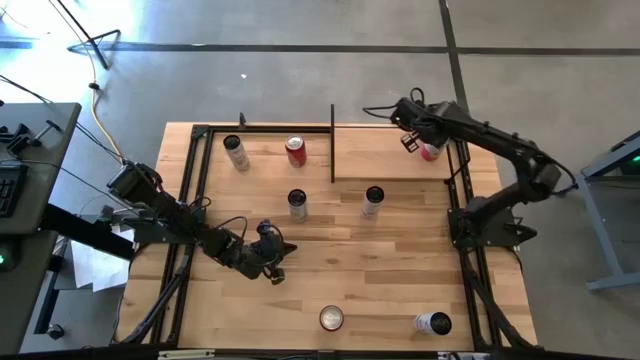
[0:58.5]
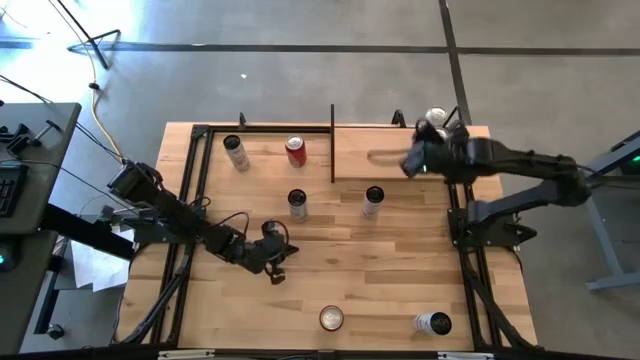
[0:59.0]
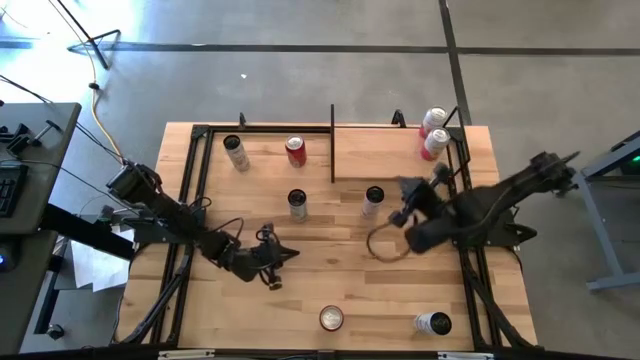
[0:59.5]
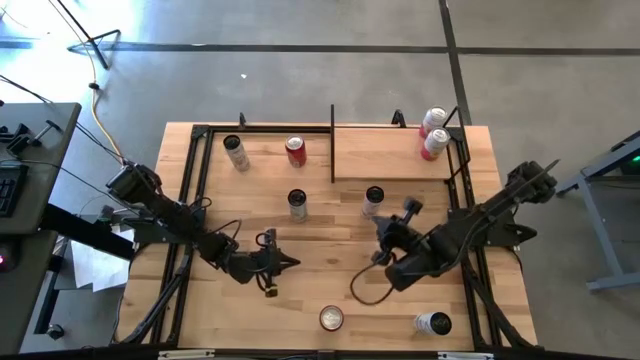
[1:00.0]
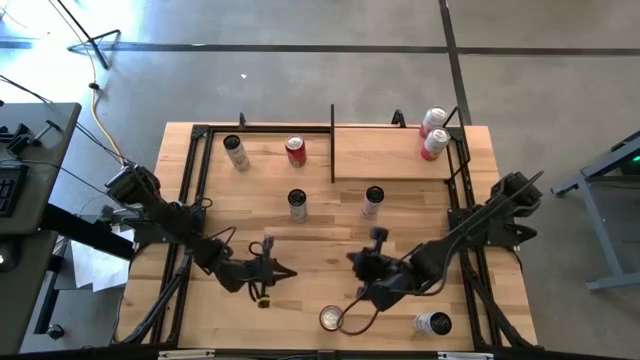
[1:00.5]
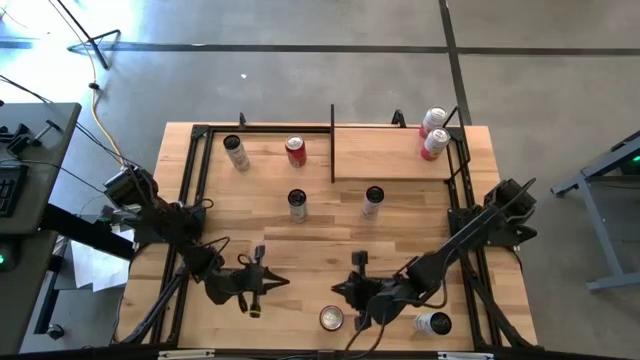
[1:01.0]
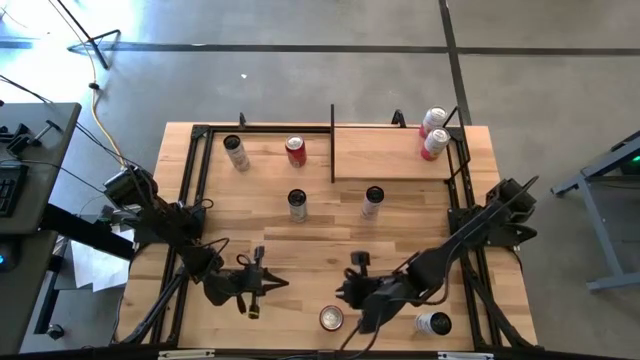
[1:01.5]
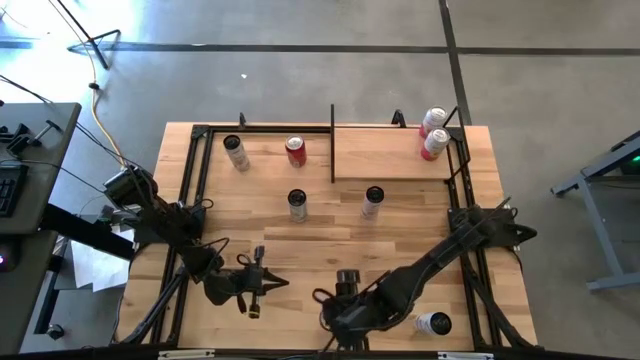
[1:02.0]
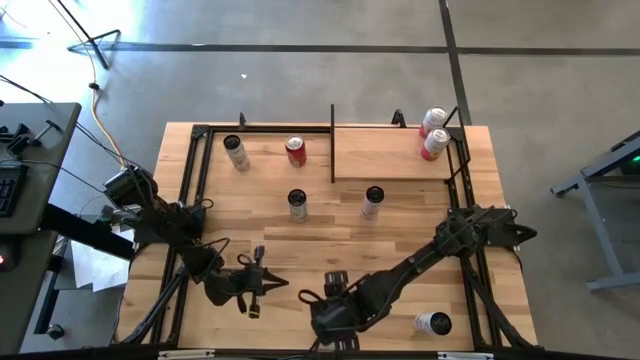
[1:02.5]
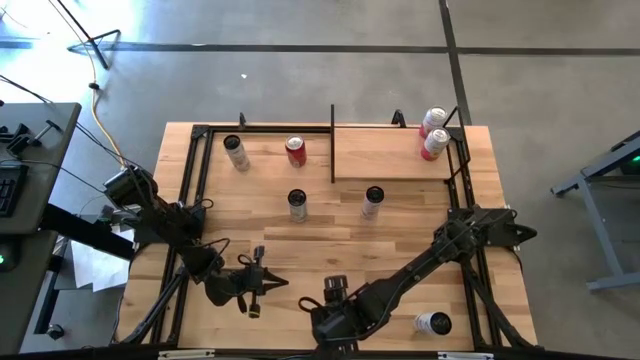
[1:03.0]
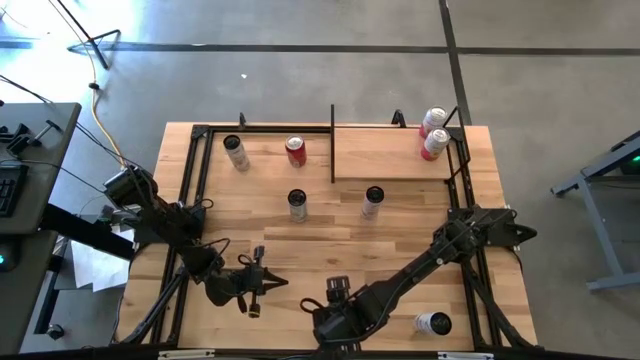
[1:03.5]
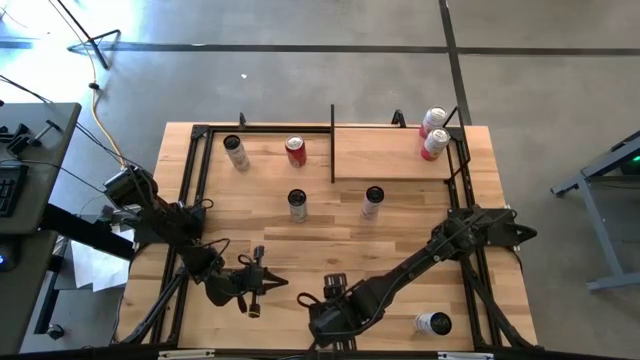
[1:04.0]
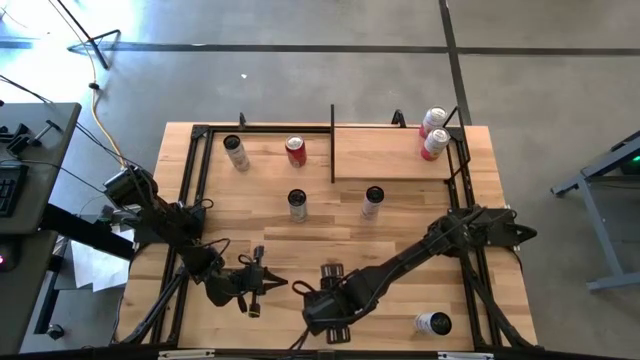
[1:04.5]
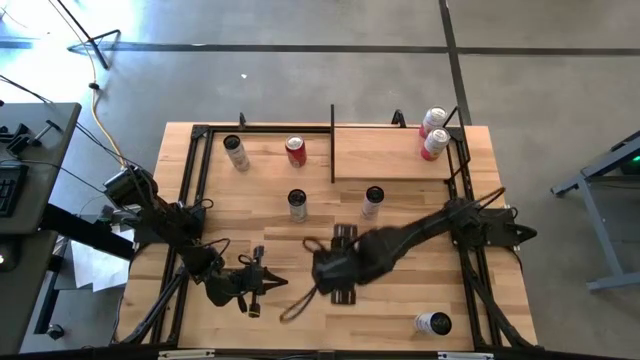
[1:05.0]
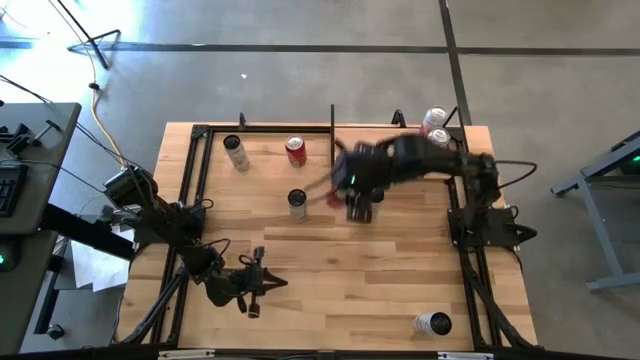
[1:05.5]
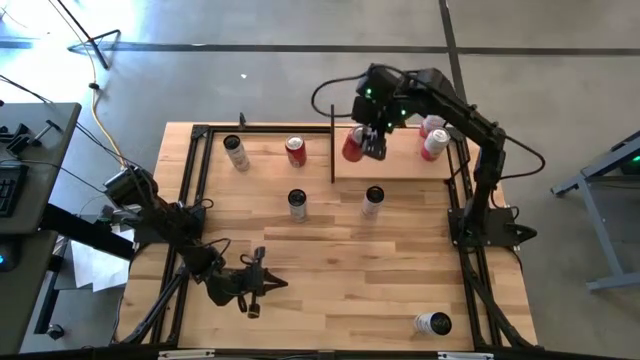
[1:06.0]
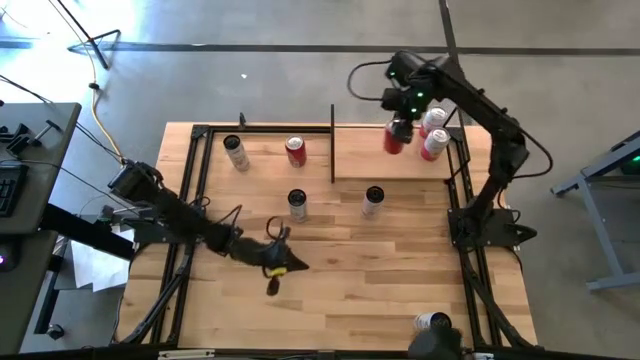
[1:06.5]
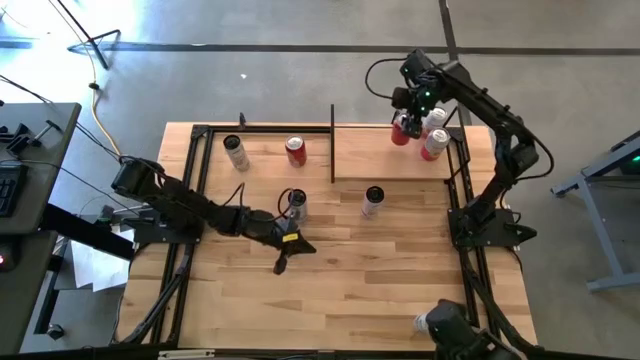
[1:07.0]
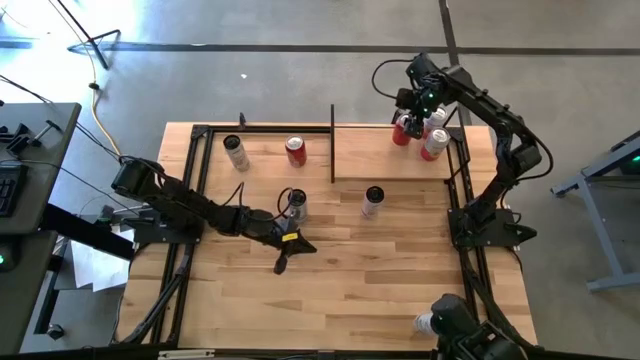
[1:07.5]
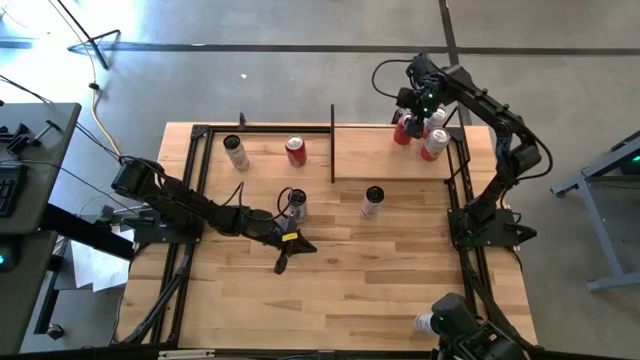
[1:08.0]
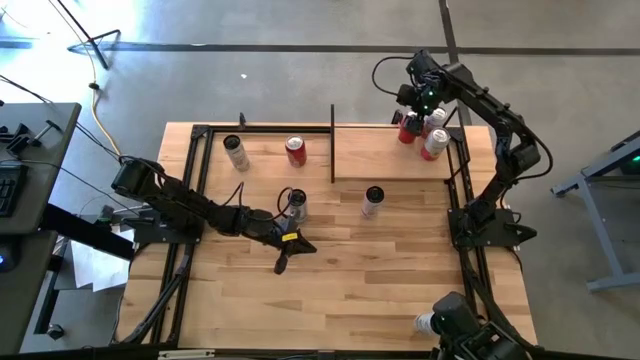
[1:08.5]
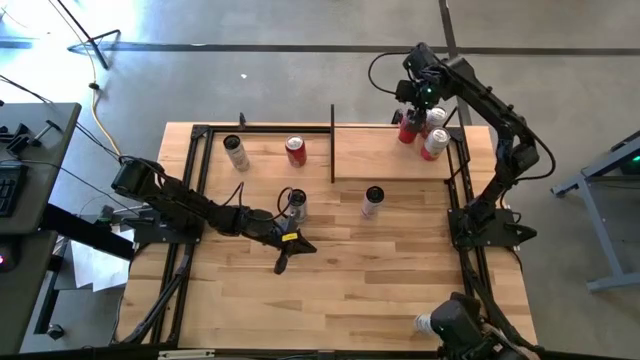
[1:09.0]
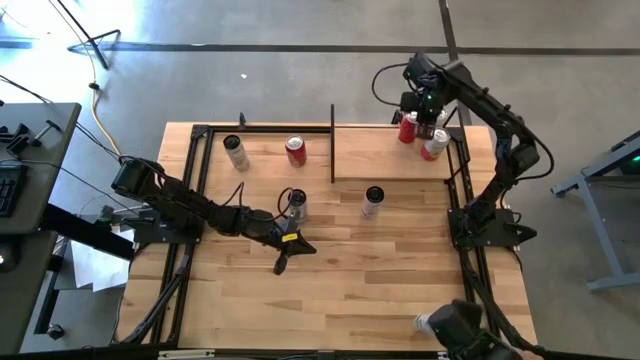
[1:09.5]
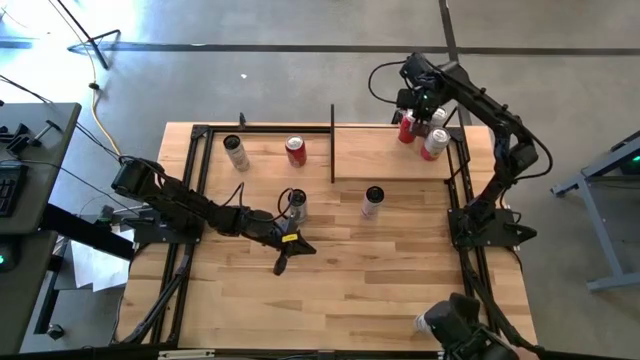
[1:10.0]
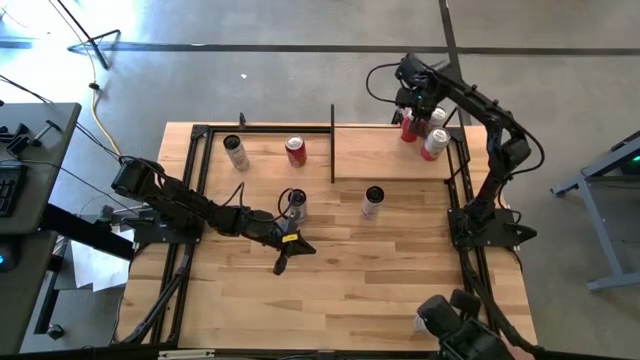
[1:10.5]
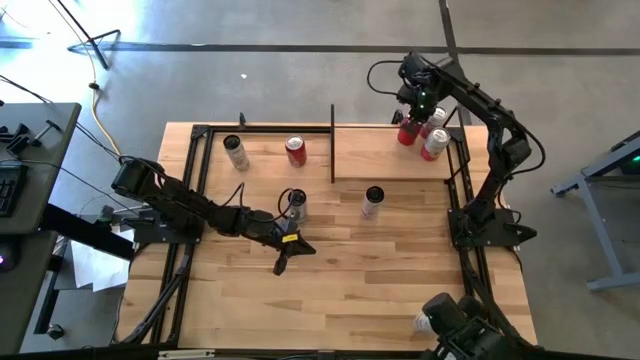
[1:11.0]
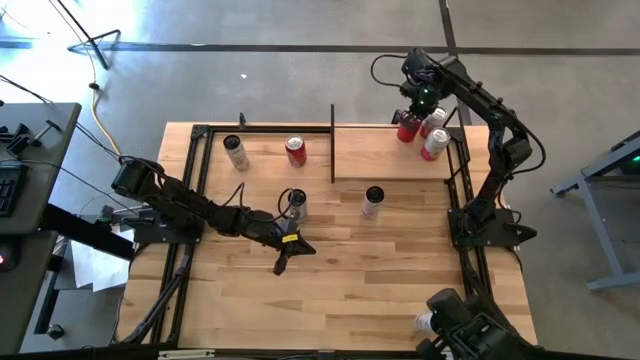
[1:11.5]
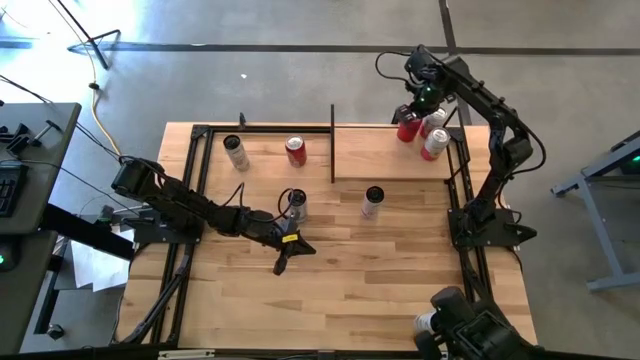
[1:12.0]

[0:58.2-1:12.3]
Task: Place canned beverage on shelf
Put the bottom red soda can on the shelf

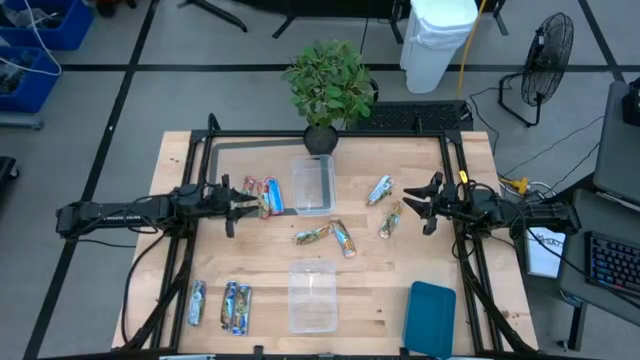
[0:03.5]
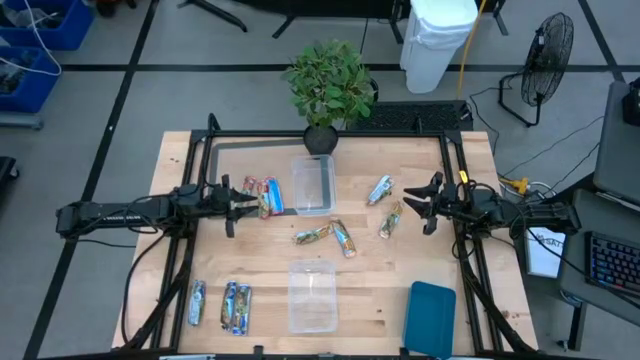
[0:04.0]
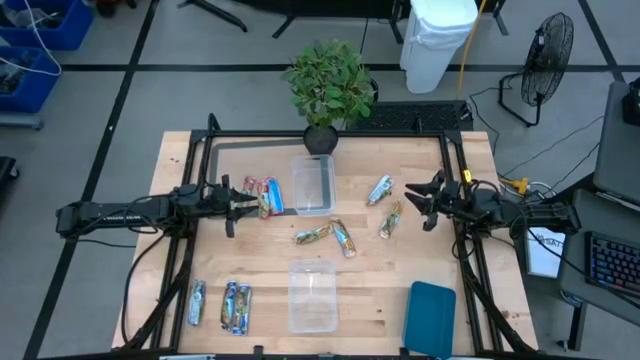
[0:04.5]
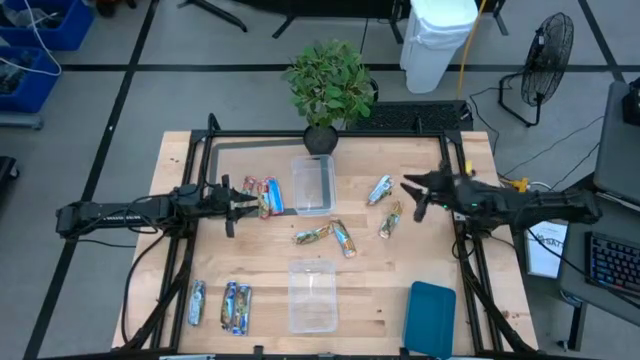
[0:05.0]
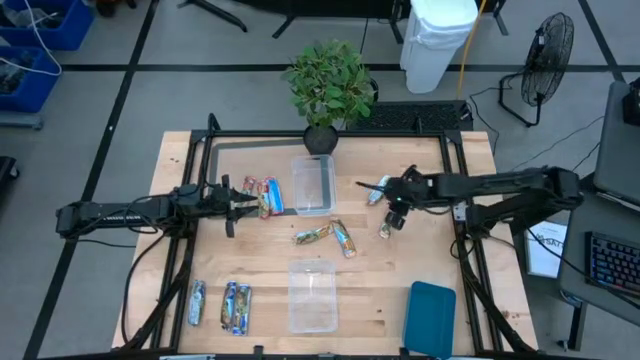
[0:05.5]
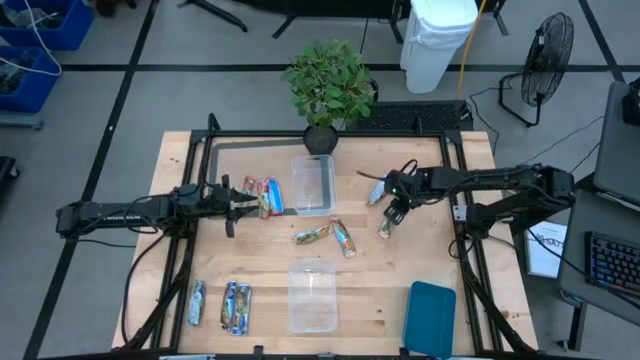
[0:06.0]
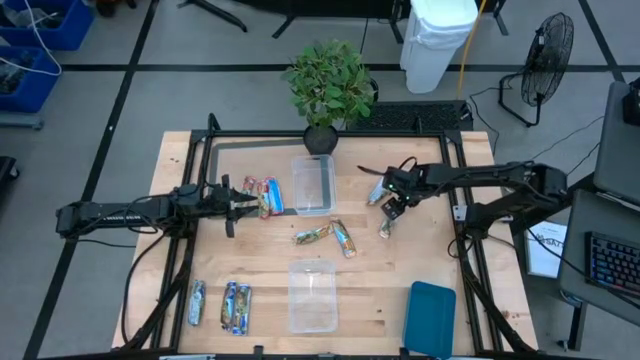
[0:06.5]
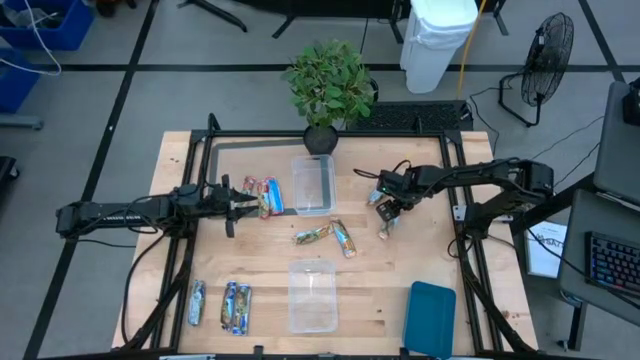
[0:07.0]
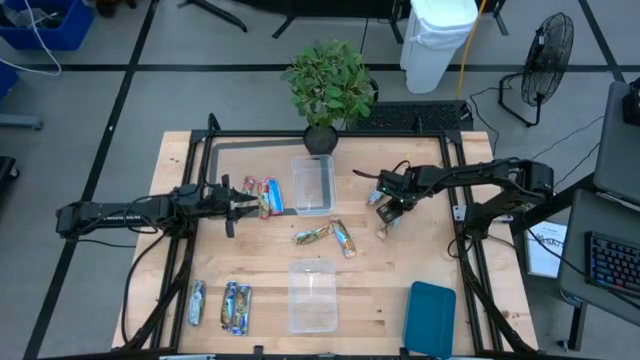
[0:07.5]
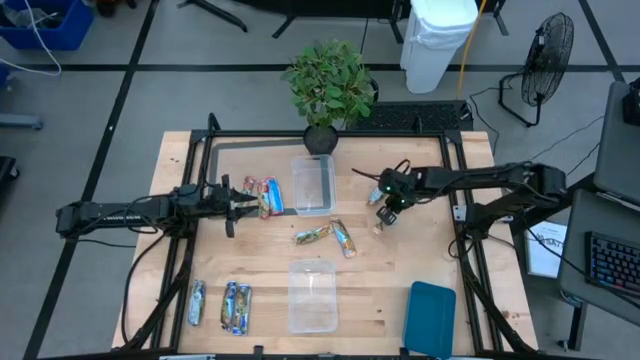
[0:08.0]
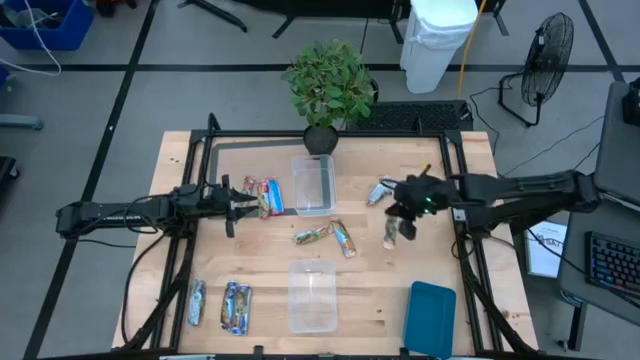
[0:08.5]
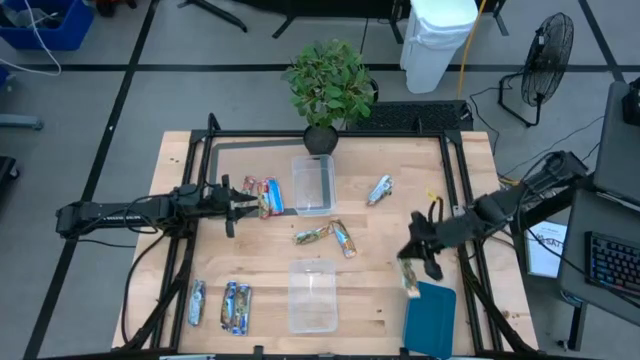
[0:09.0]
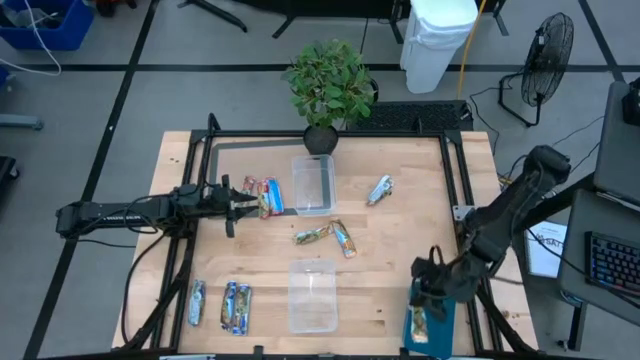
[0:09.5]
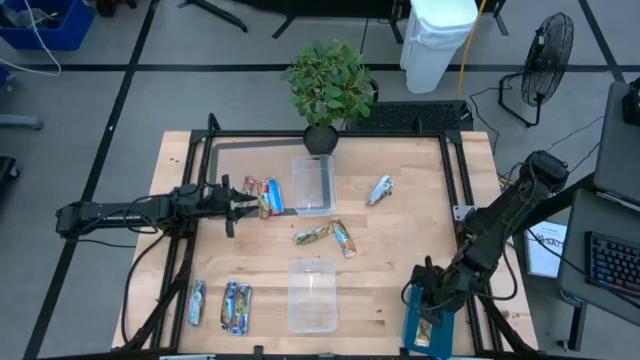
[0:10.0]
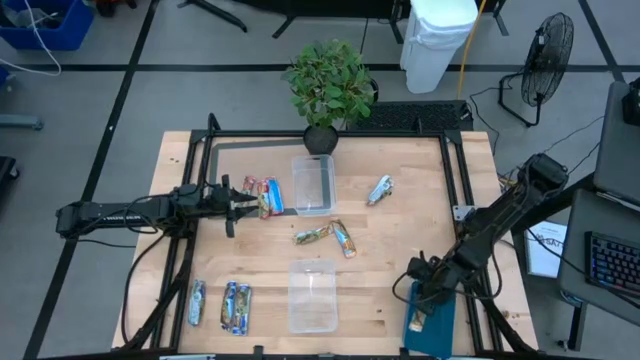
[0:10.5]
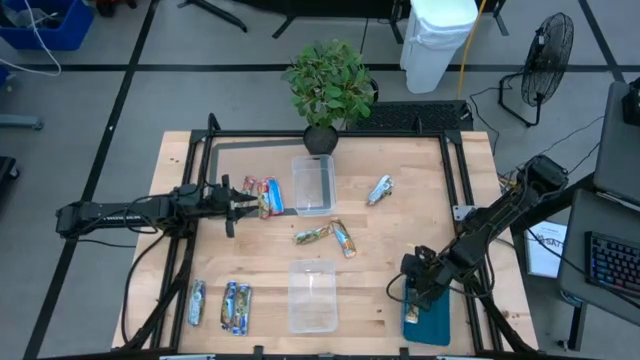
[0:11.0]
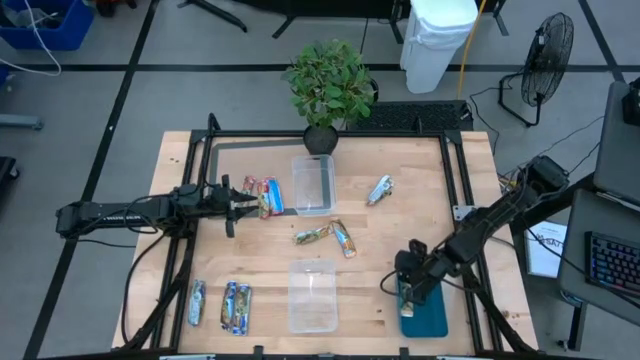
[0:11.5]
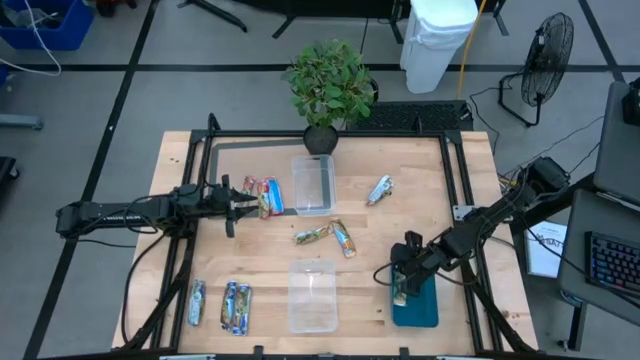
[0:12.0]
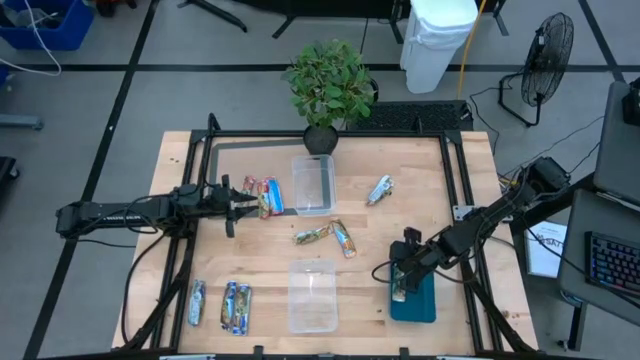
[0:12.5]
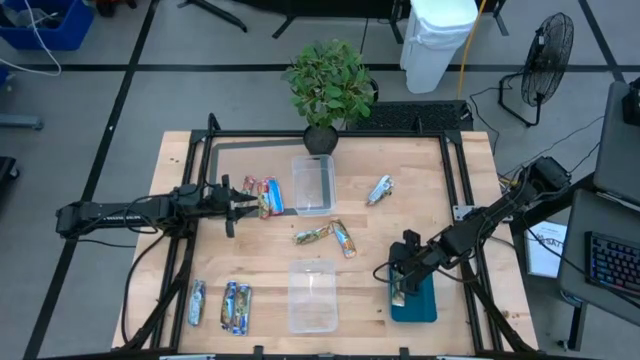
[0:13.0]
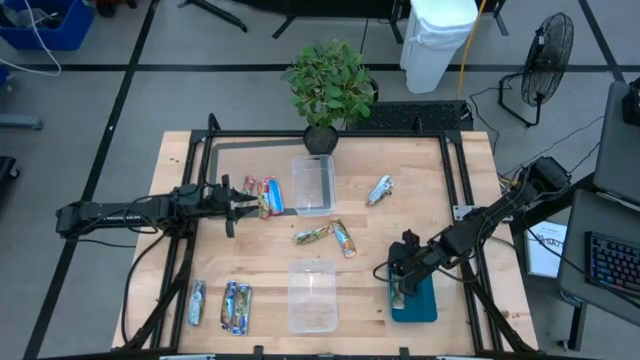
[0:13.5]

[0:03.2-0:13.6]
Task: Pick and place Granola Bars by type
Put the yellow granola bar into the blue bin
